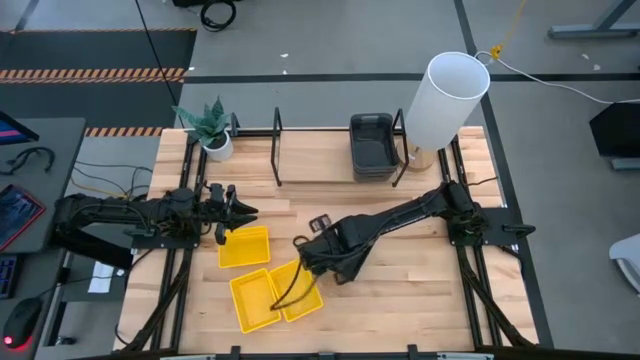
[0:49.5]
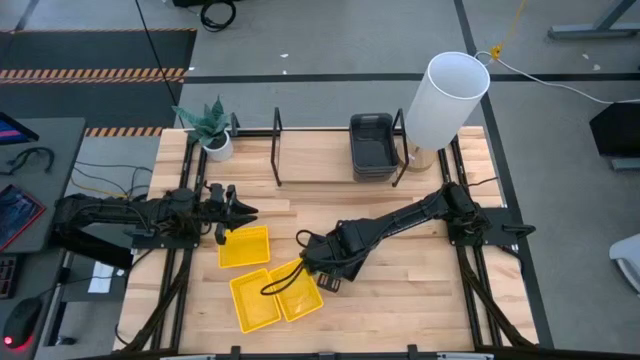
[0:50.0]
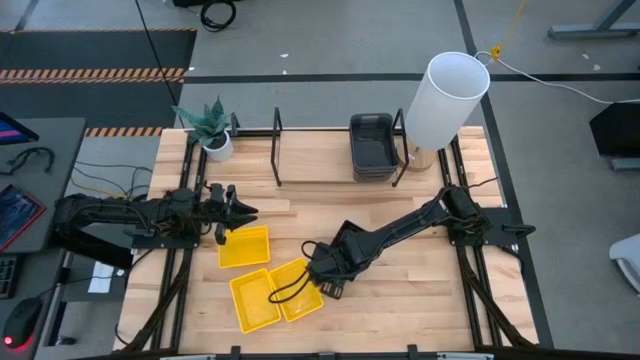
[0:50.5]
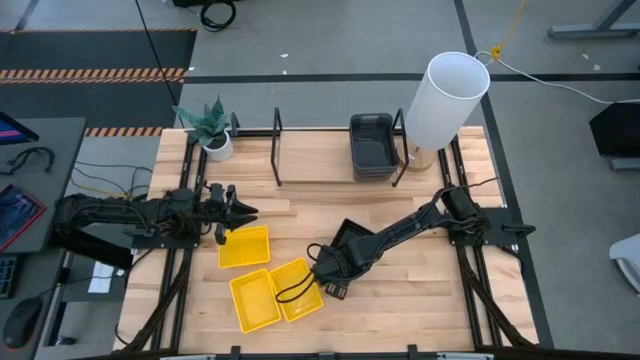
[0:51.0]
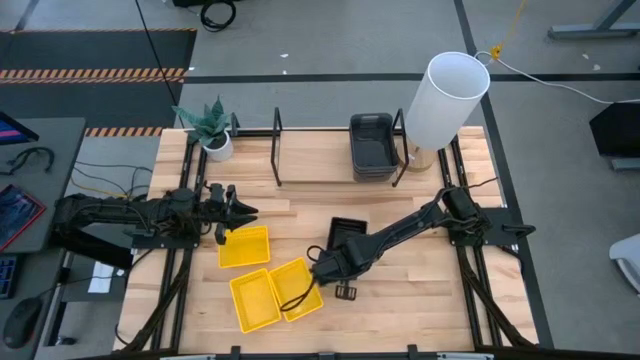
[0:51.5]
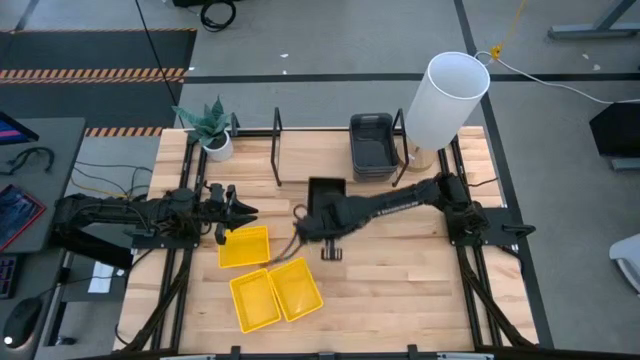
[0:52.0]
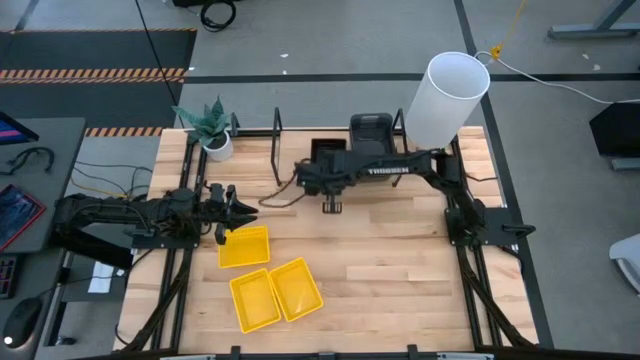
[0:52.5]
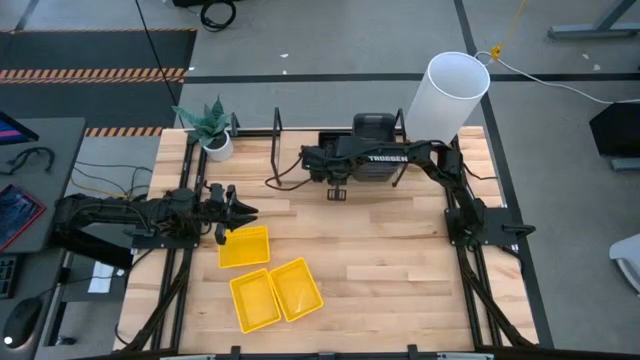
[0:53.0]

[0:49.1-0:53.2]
Task: Stack baskets on shelf by color
Put the stacked black bins on the shelf

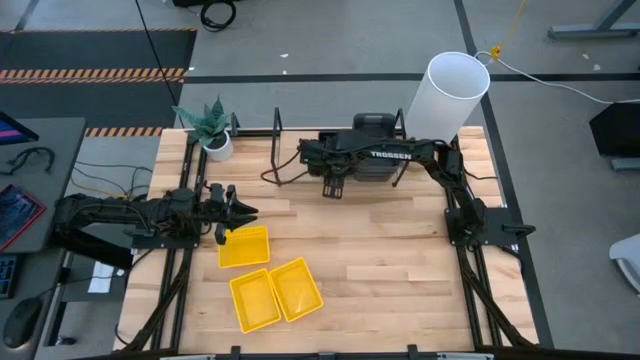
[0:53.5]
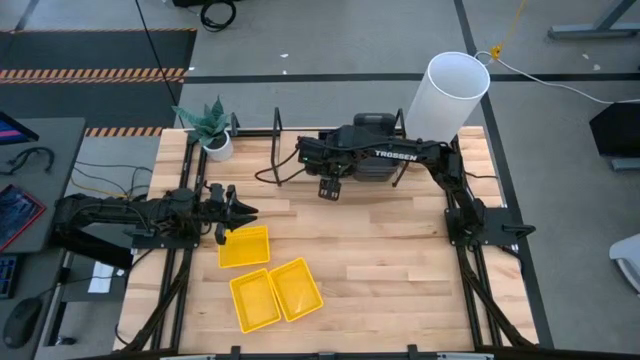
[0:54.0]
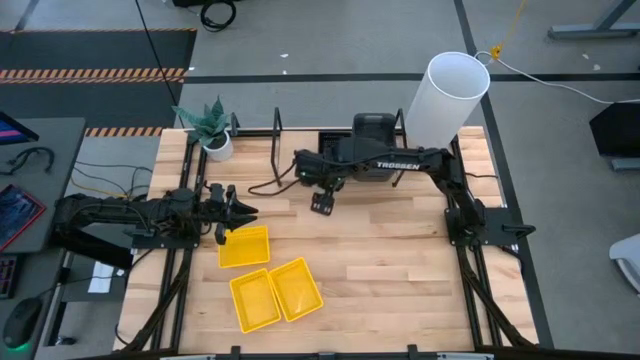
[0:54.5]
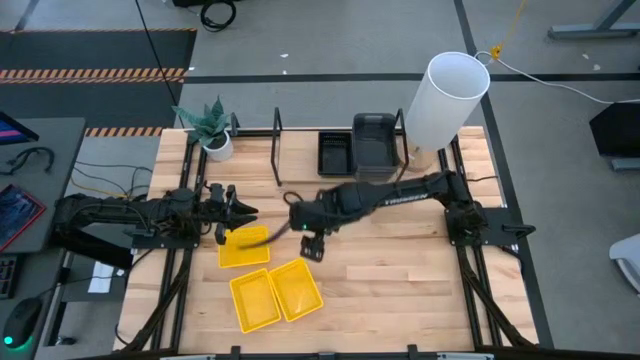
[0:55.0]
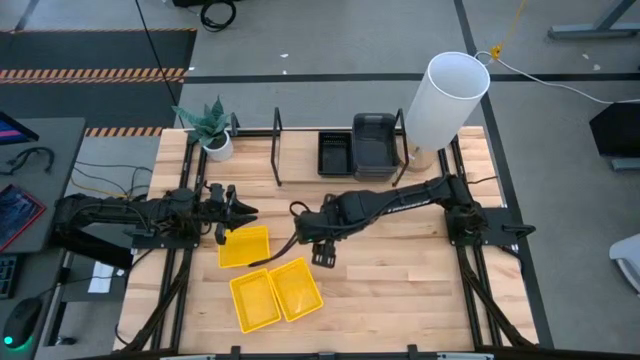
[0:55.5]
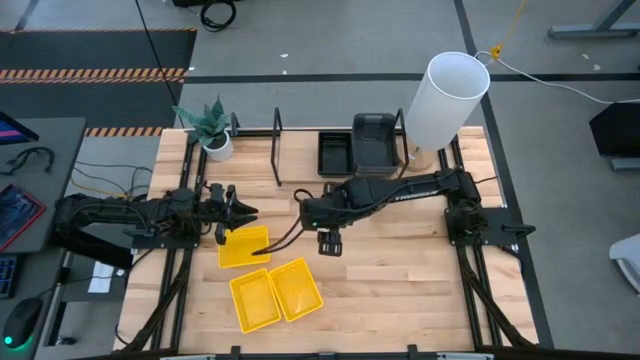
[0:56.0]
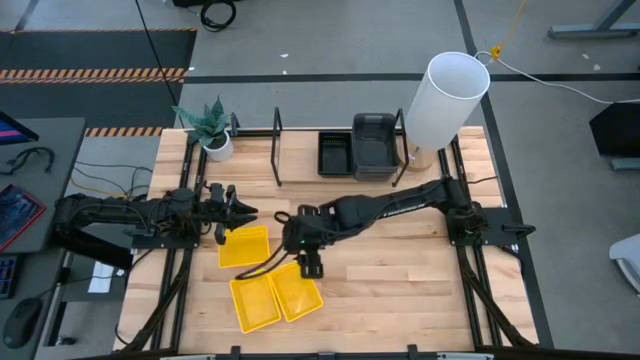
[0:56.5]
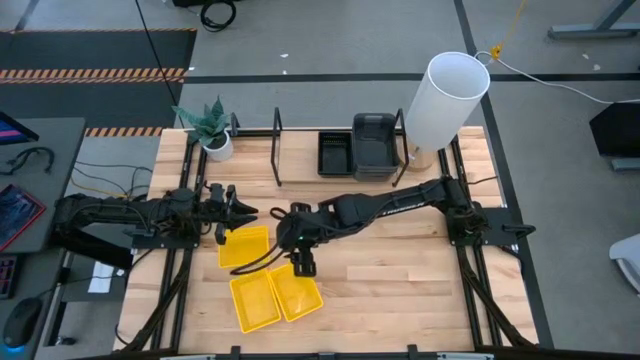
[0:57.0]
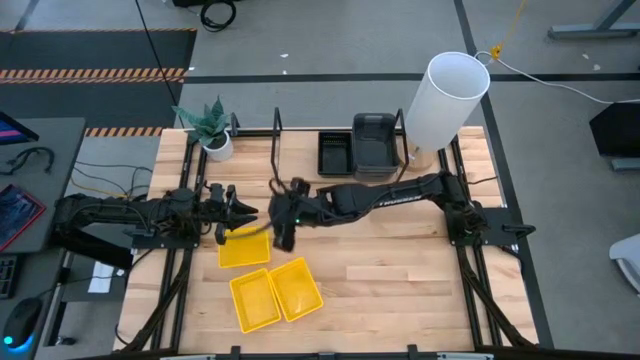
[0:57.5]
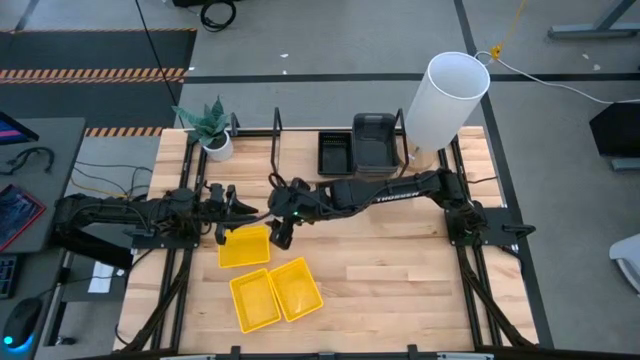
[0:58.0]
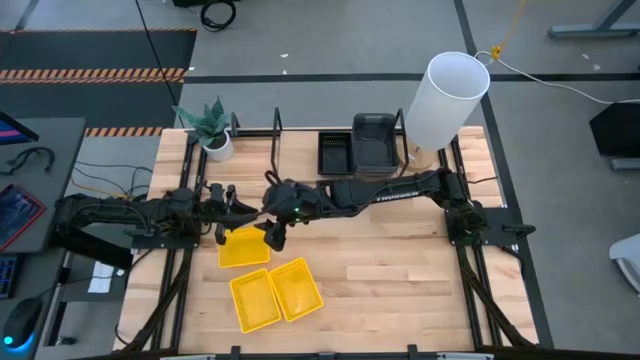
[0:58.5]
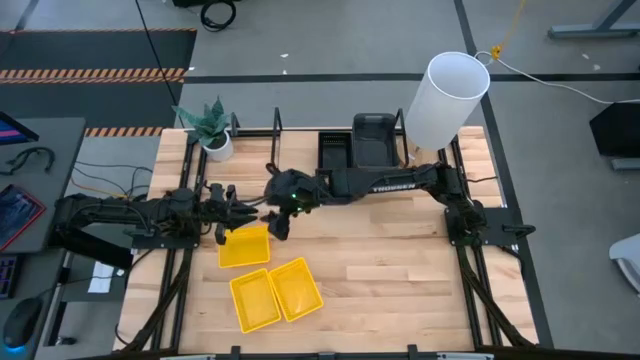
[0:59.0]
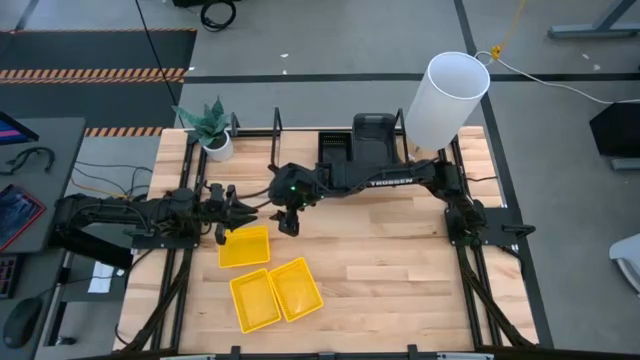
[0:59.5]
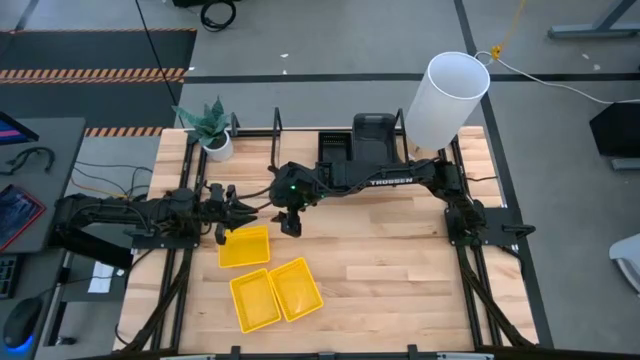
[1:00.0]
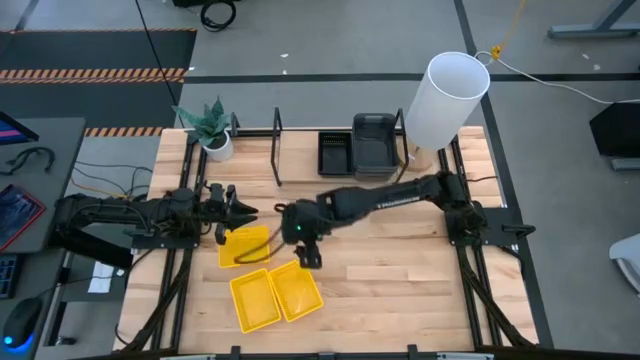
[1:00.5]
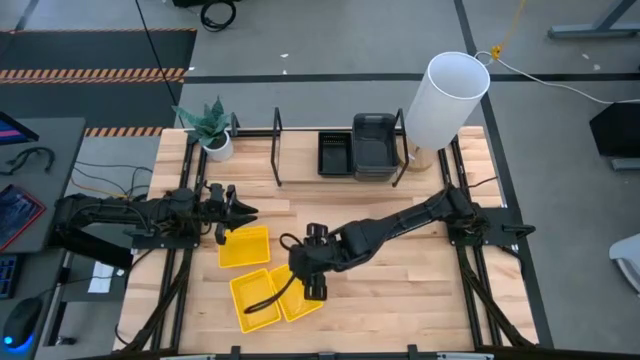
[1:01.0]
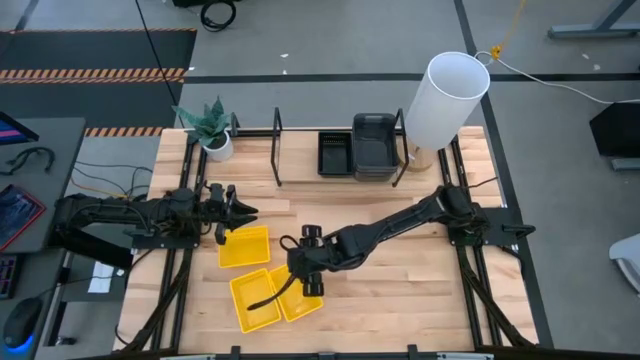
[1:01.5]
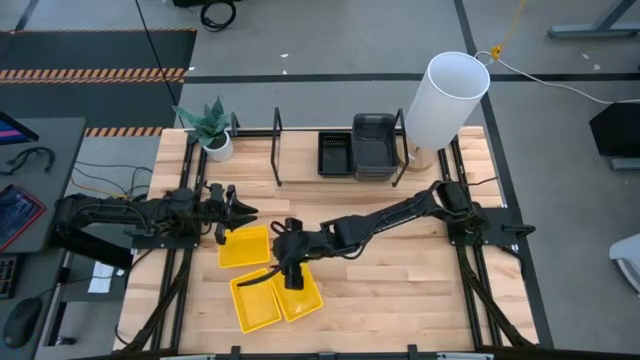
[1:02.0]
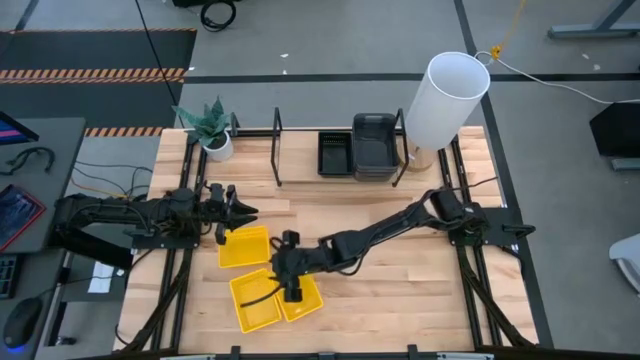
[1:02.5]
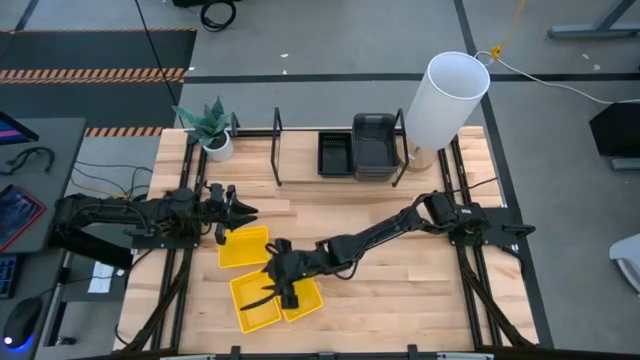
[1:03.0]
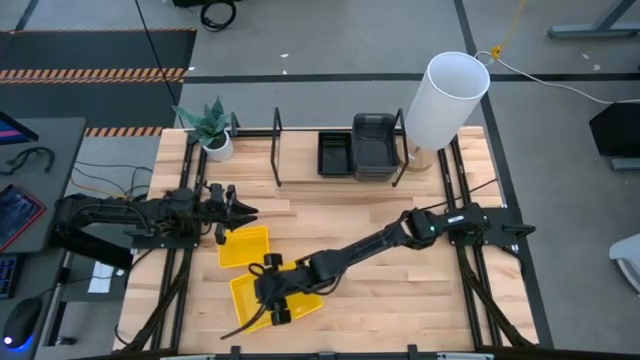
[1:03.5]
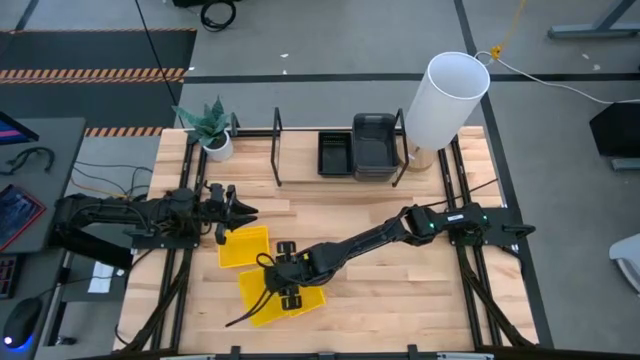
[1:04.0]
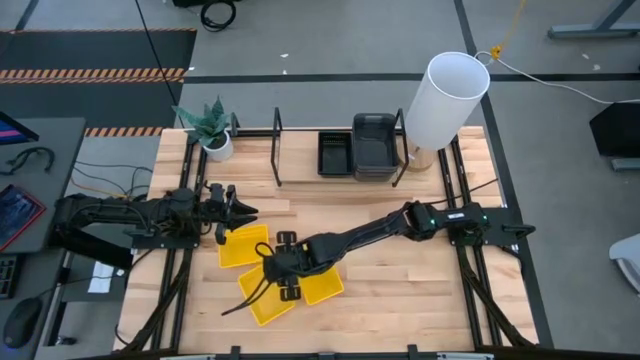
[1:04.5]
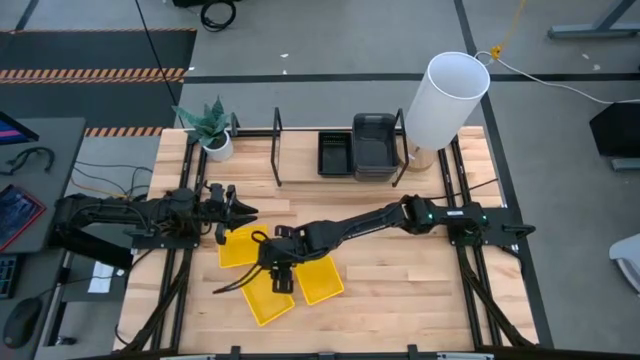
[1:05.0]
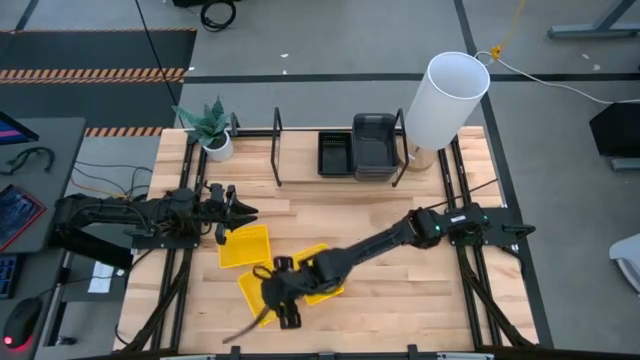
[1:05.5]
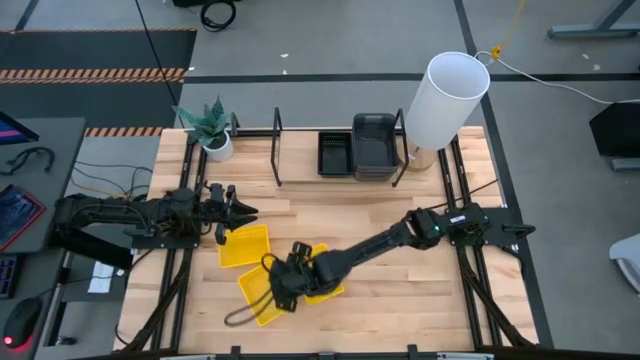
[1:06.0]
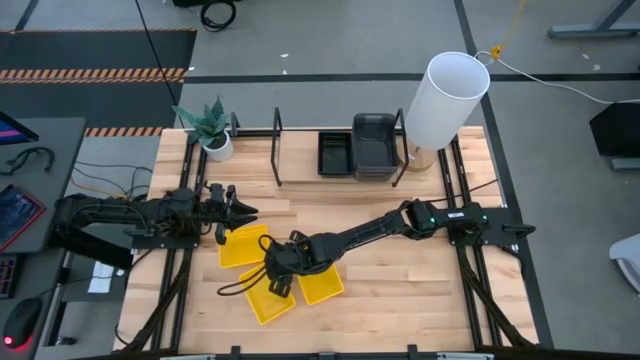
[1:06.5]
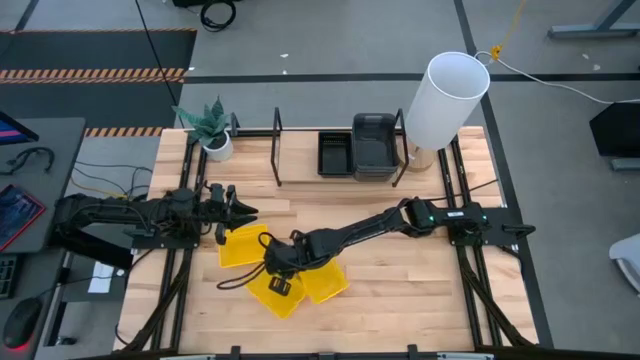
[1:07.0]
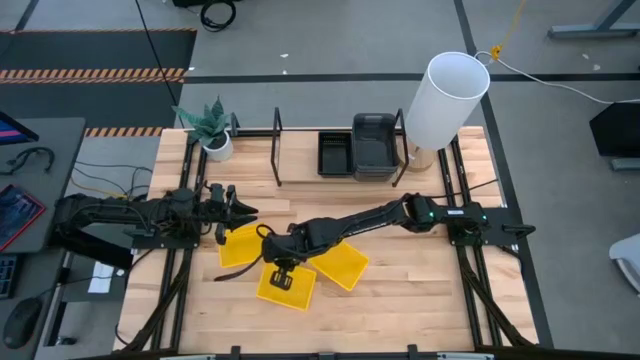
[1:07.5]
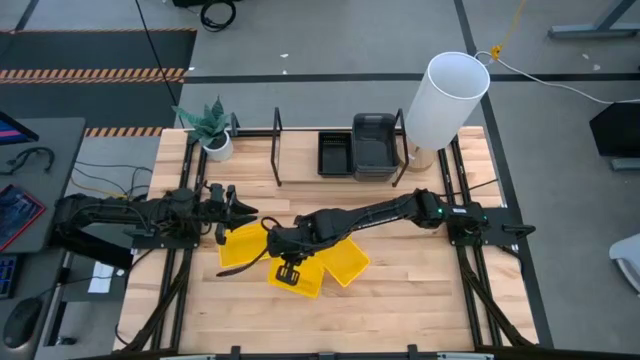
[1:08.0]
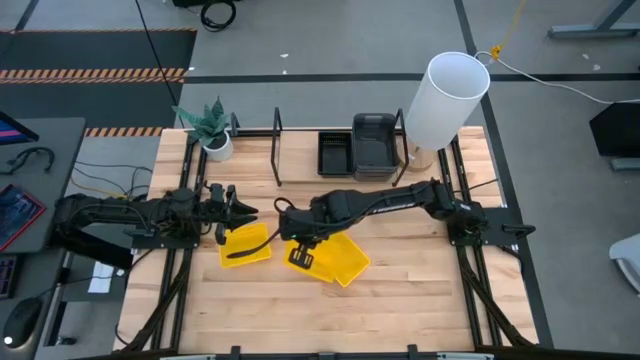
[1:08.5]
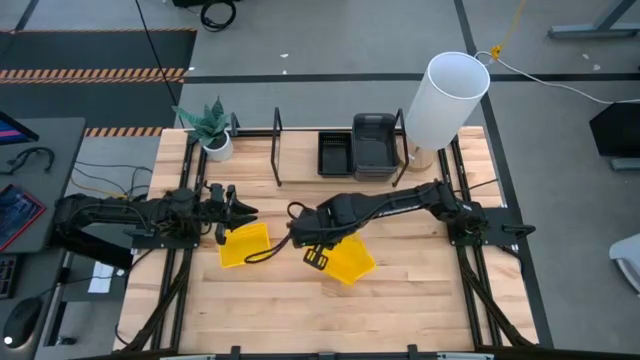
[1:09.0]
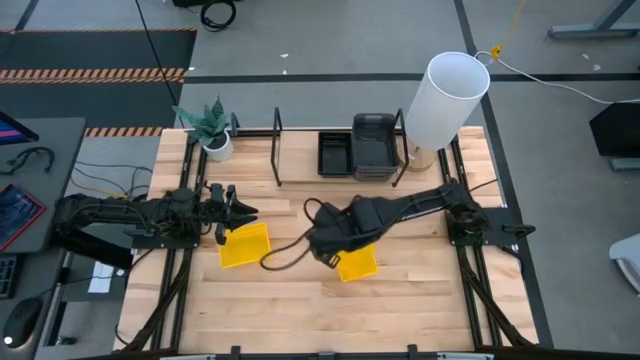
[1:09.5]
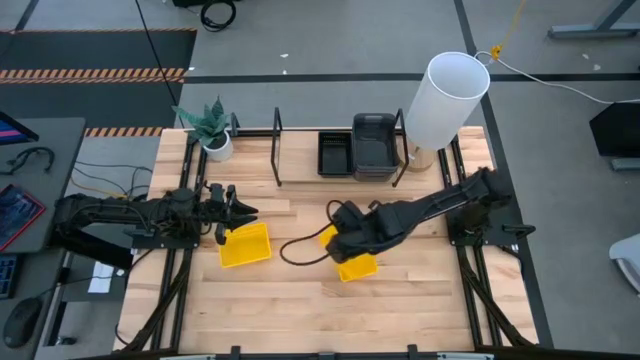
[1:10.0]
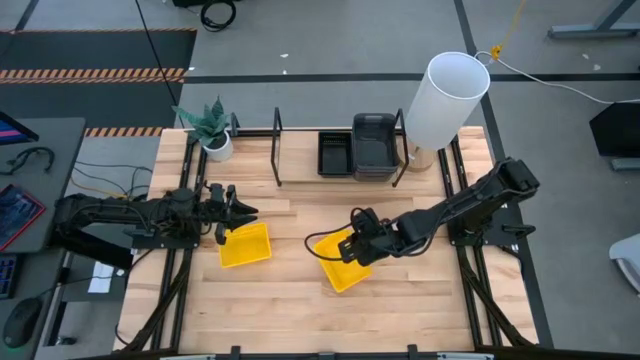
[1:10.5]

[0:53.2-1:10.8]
Stack the bottom left yellow bin on top of the bottom right yellow bin

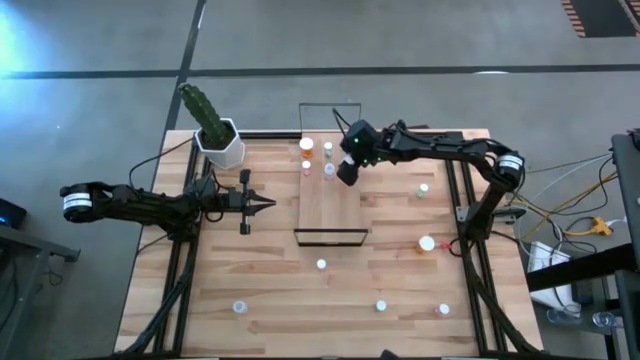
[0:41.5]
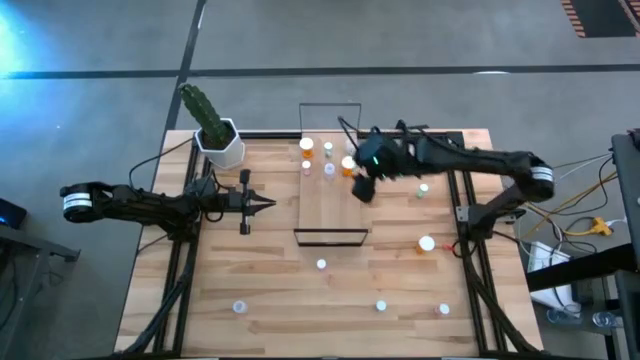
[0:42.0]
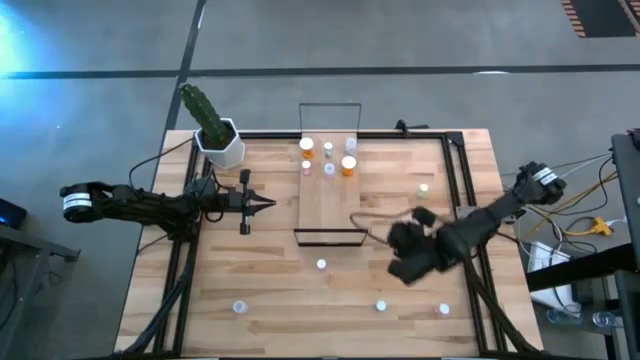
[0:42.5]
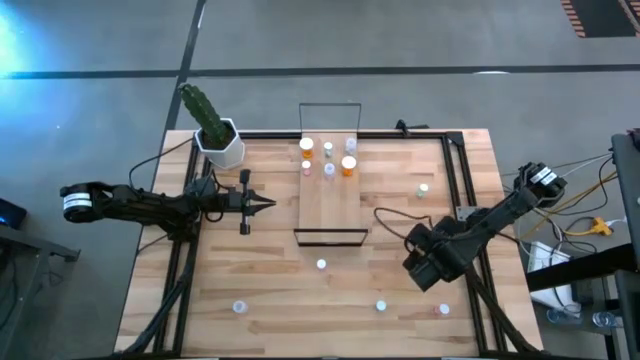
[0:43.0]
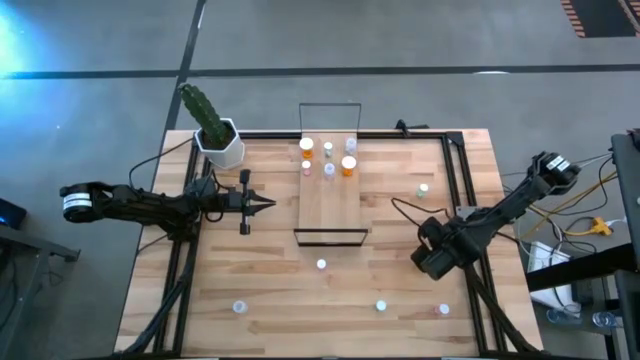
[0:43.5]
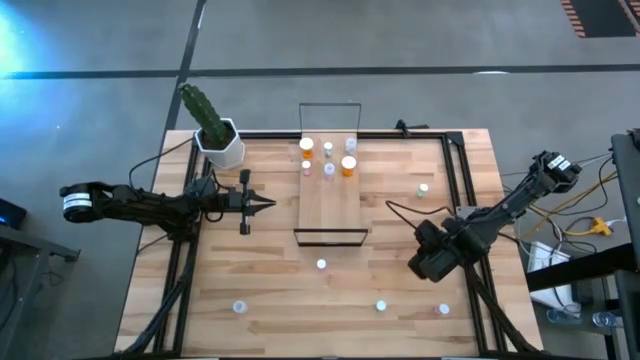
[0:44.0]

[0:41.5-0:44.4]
Task: Pick and place medicine bottles onto shelf by color
Put the yellow transparent pill bottle on the shelf
